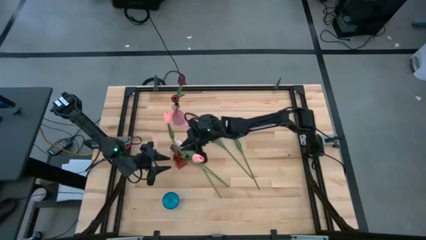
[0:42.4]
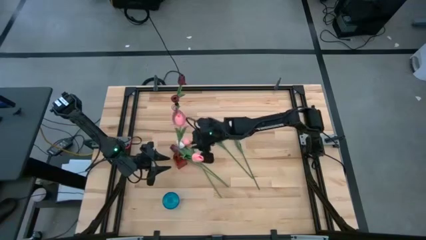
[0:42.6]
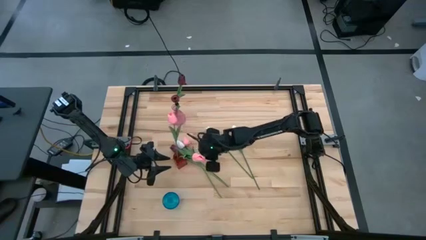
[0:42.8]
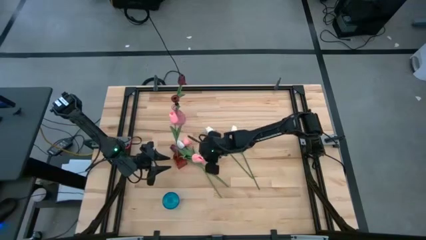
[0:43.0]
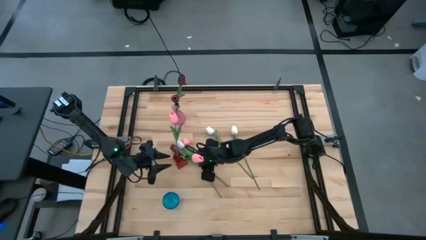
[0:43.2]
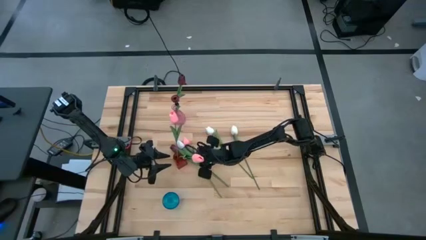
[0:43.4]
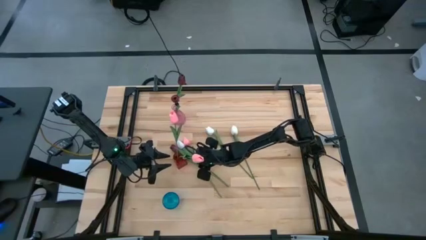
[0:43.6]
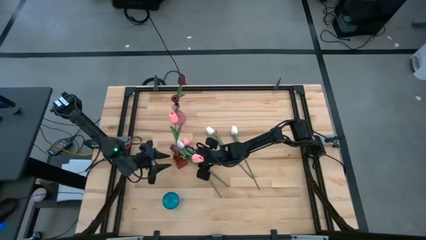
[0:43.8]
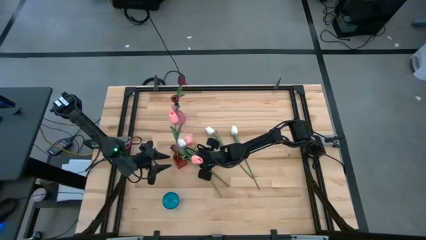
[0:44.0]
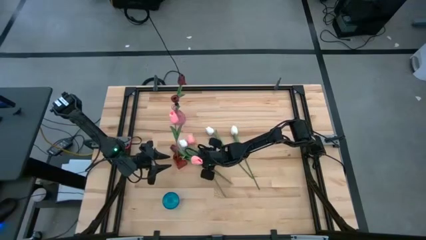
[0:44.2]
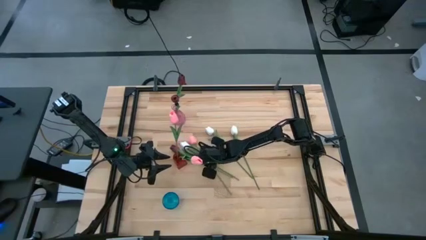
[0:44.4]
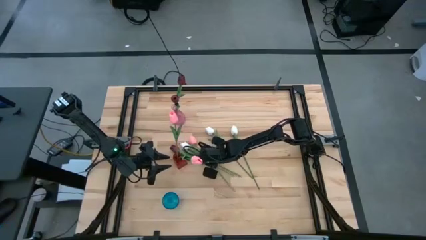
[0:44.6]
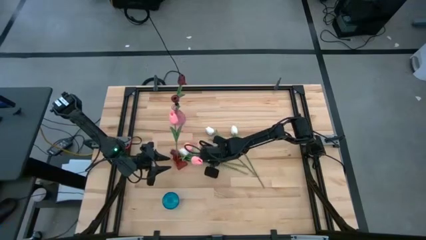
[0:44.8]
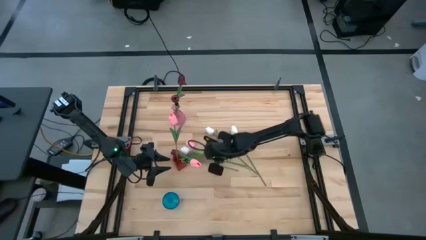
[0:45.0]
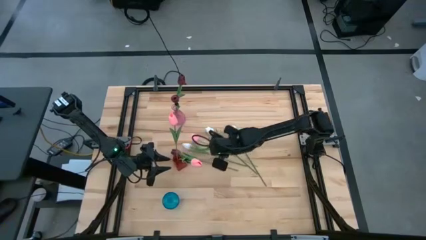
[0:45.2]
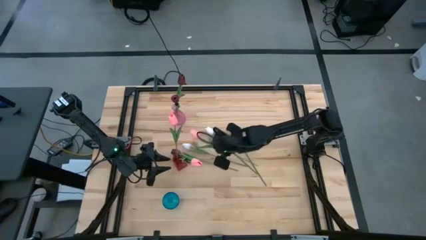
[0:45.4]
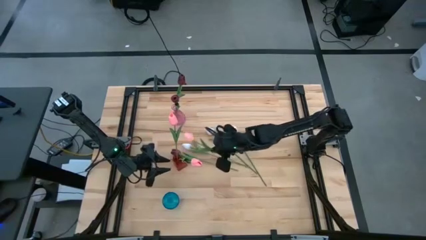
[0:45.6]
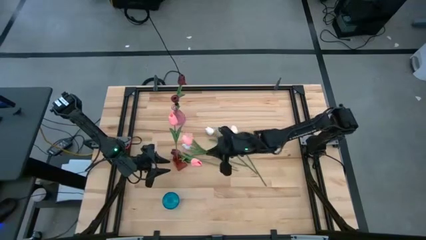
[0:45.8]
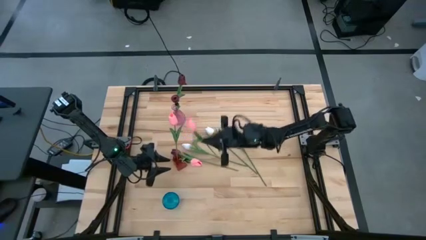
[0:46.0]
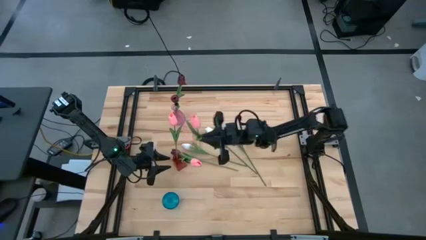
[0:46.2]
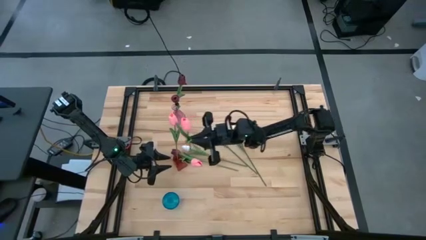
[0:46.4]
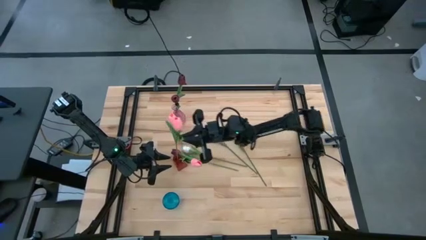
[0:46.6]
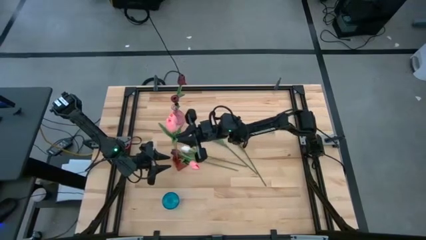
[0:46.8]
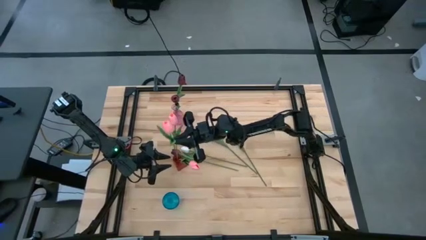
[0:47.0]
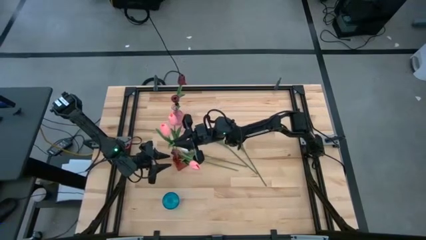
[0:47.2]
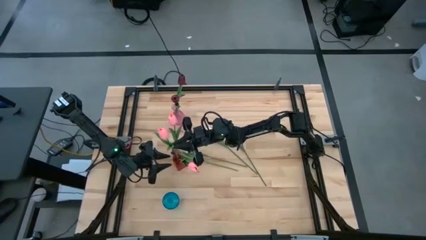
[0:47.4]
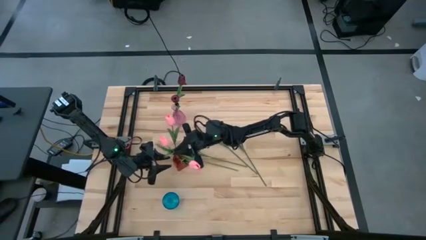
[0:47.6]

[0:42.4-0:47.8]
Task: Sort flowers into vase by color
Put the pink flower into the red vase

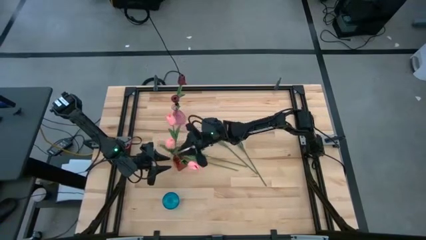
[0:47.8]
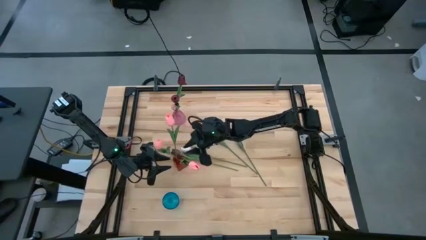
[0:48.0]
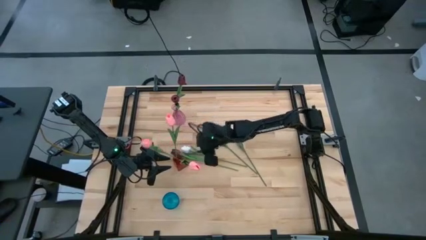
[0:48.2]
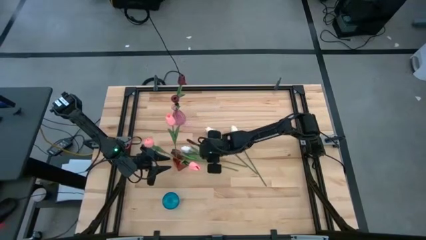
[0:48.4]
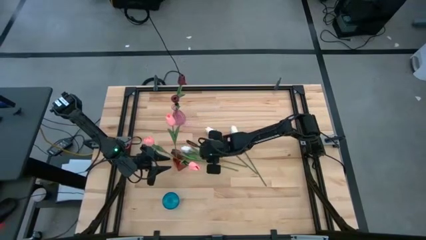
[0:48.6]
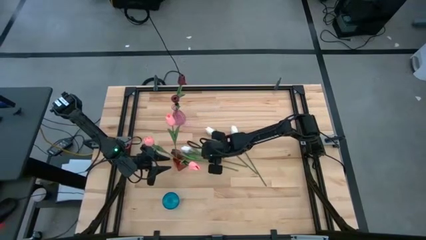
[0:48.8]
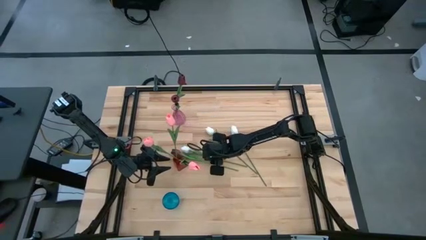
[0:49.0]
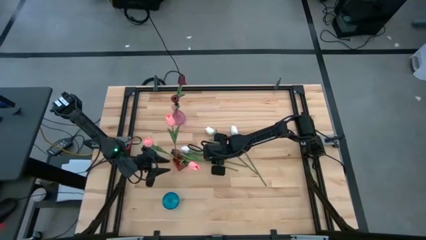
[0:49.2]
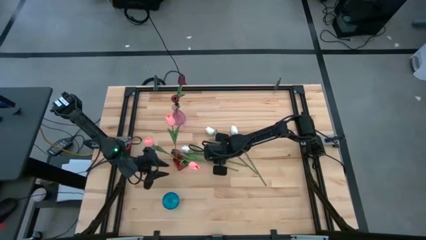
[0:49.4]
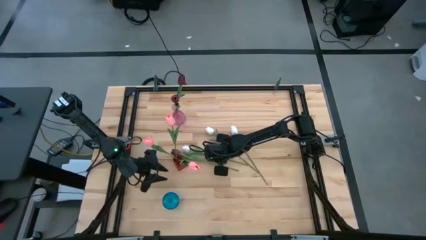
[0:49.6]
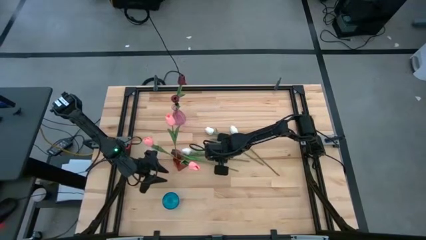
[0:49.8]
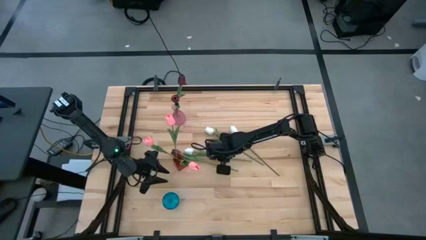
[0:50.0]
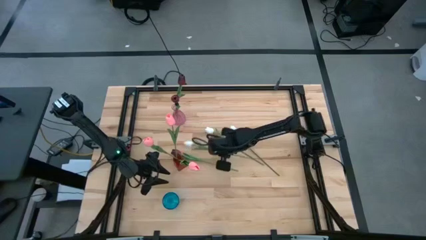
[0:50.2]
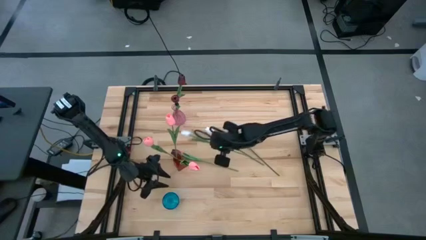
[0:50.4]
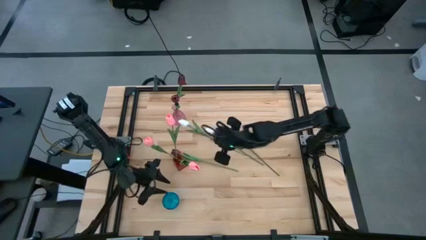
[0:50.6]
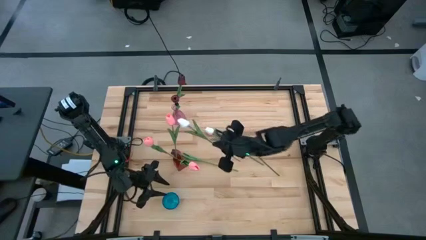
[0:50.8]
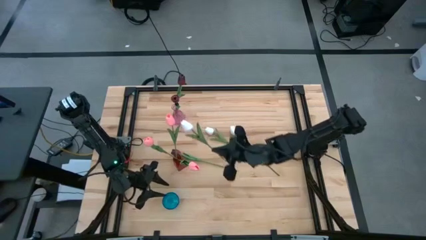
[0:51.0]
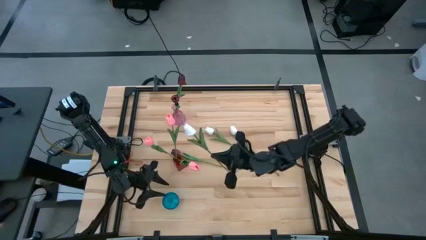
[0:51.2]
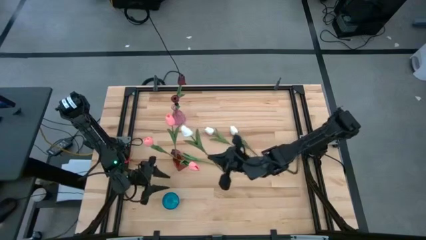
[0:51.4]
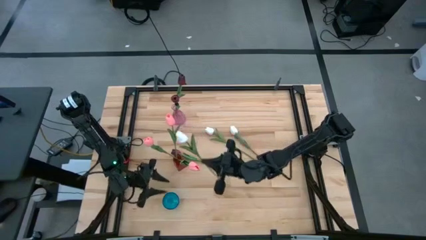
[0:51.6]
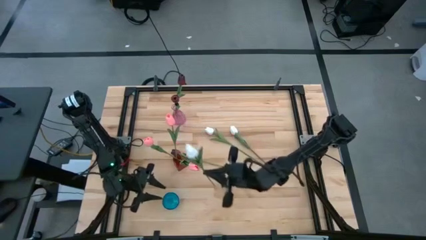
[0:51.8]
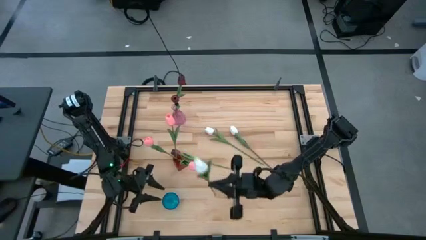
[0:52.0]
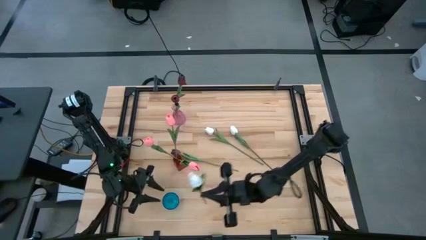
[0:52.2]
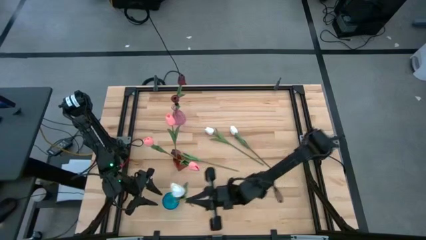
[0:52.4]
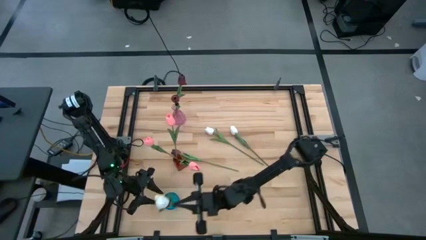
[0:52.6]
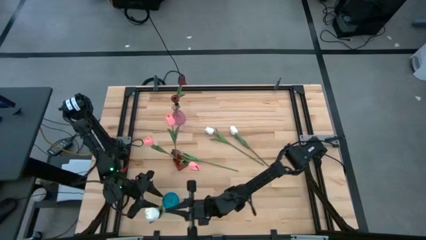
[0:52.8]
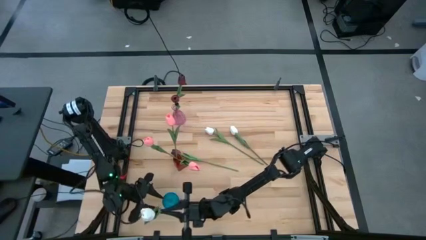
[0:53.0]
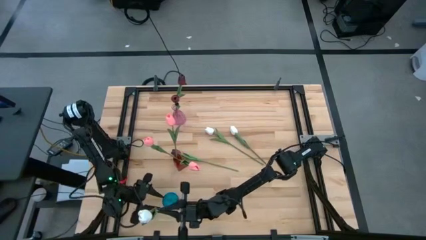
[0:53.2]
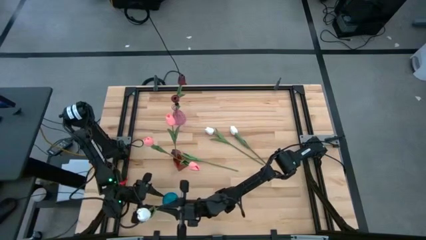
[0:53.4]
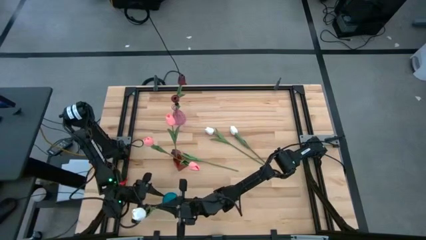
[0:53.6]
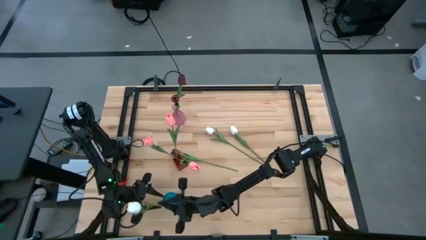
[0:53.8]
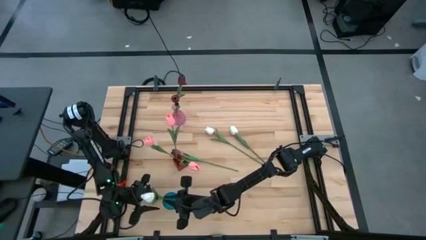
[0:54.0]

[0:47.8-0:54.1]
Put the left white flower into the blue vase

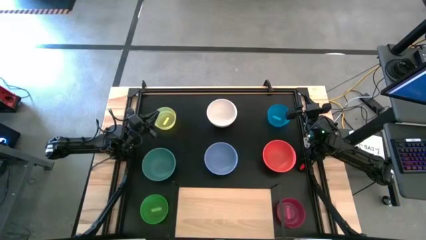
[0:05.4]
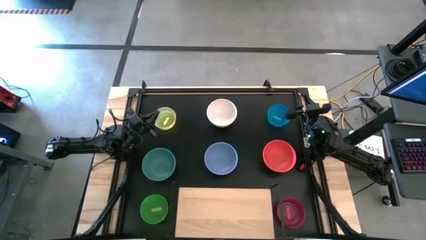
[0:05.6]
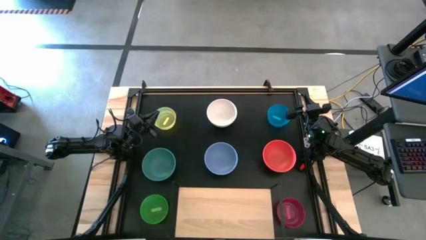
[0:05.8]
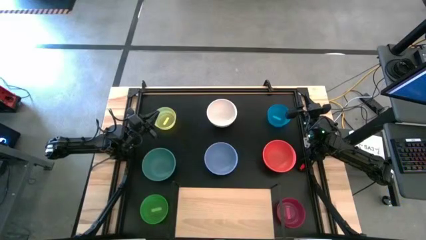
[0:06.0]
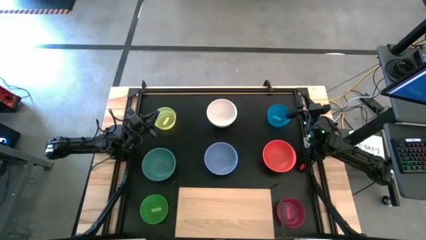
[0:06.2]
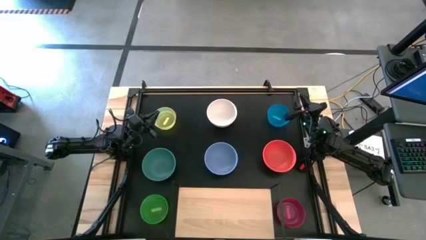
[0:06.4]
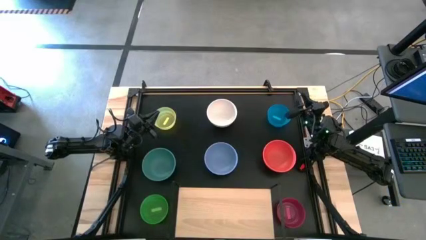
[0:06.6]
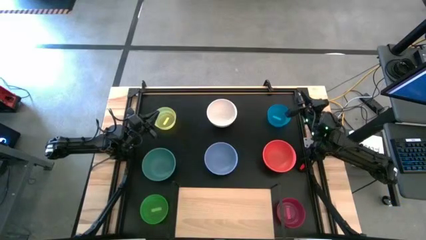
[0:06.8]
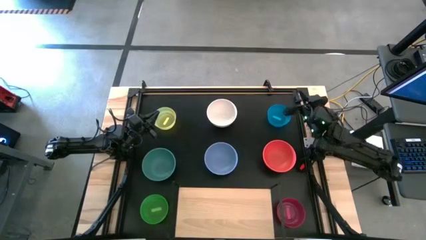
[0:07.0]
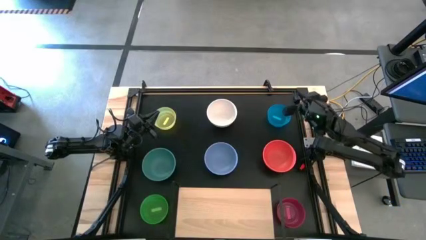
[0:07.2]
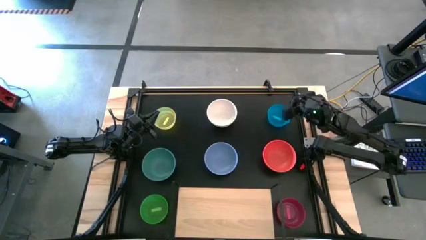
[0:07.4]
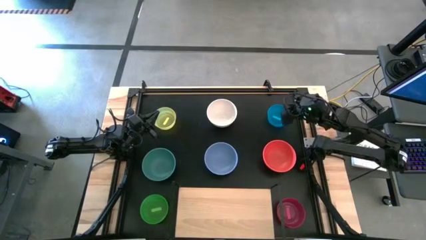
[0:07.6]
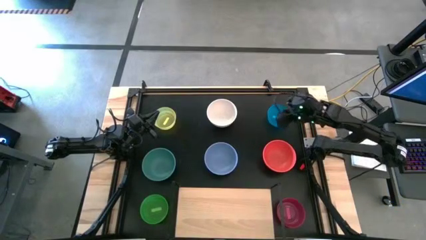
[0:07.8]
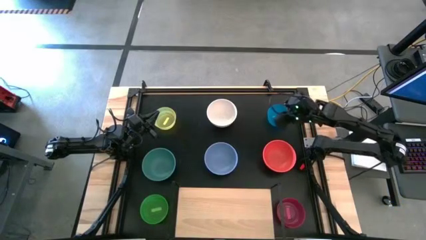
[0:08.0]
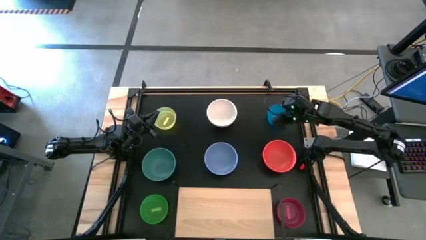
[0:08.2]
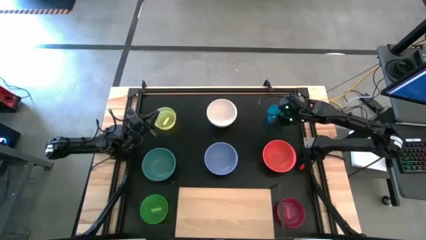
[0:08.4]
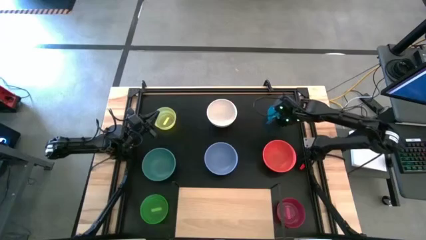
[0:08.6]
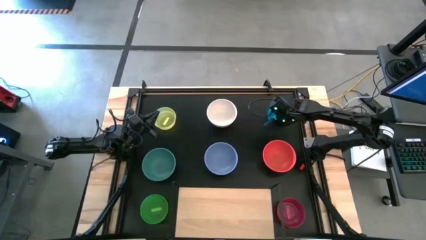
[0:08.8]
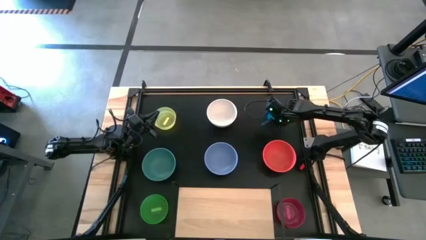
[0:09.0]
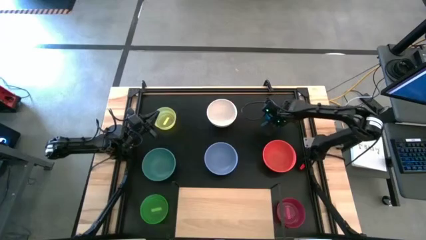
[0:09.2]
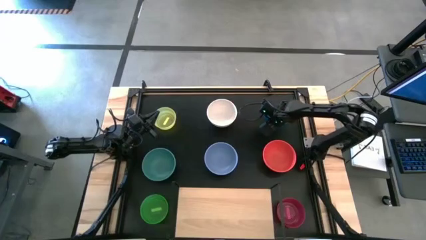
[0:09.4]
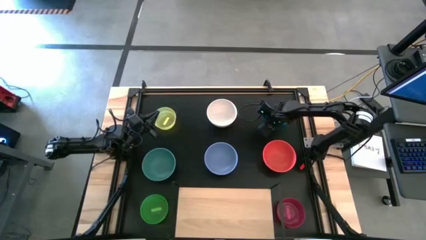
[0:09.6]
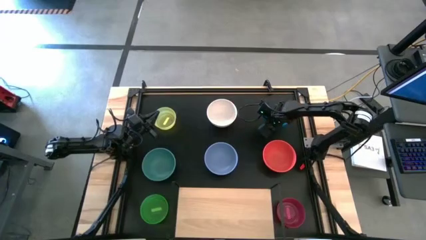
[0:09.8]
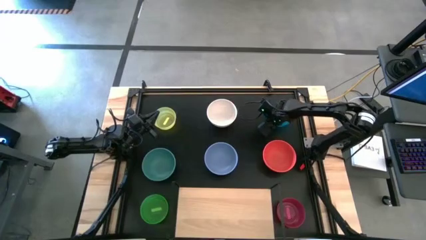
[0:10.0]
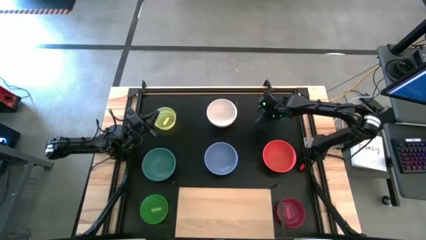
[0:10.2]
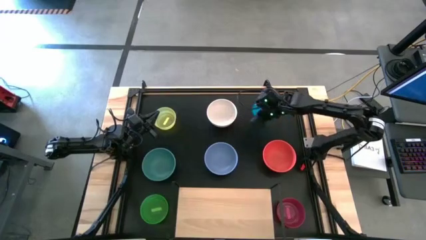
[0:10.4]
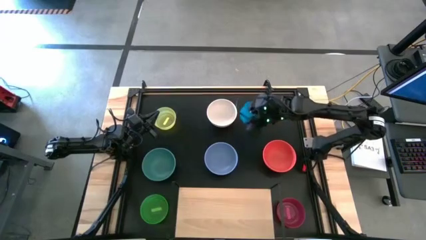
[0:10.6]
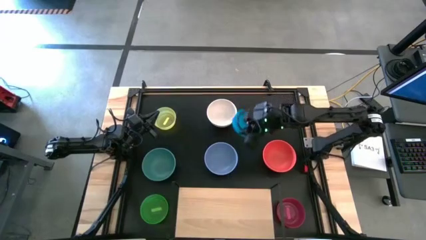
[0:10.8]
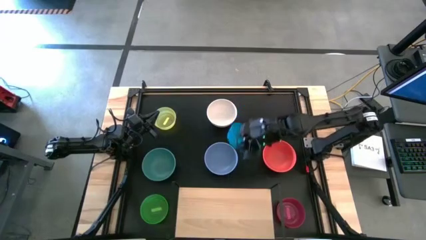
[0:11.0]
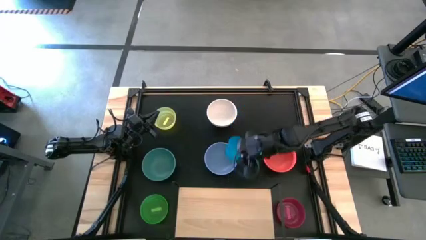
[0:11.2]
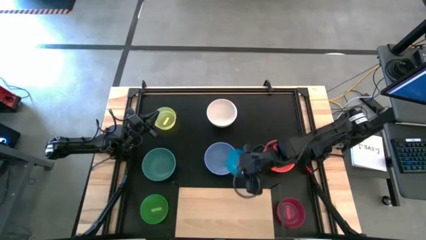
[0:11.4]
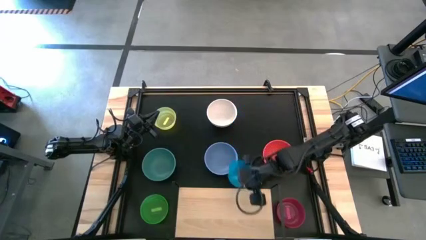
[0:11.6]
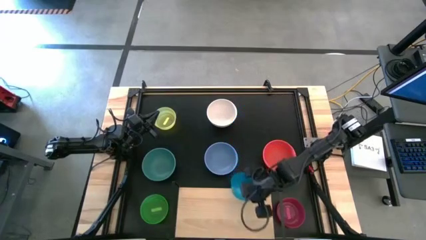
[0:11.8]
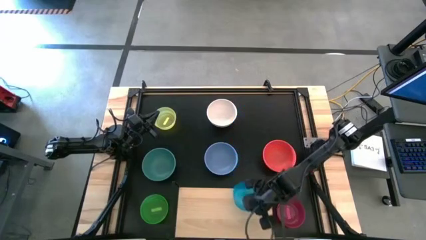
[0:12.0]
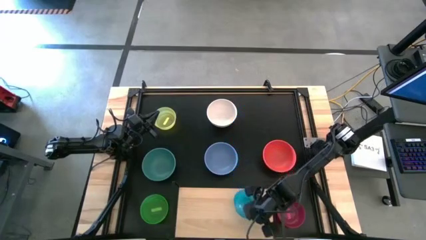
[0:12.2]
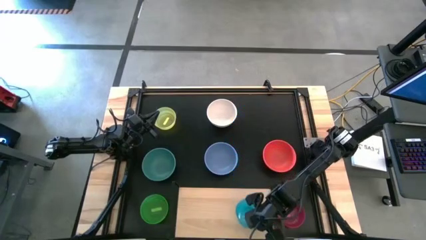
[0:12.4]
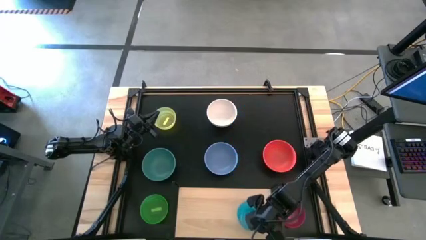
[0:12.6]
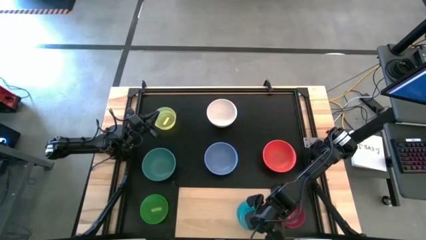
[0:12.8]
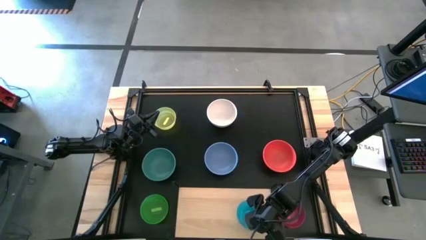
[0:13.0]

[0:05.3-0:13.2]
Task: Place and stack bowls onto a shelf
Put the small blue bowl on the shelf
